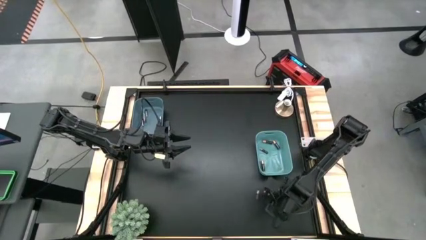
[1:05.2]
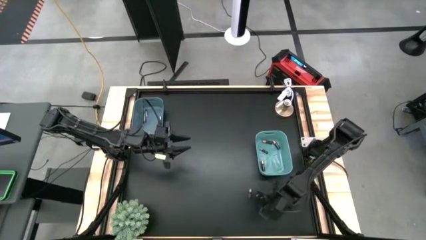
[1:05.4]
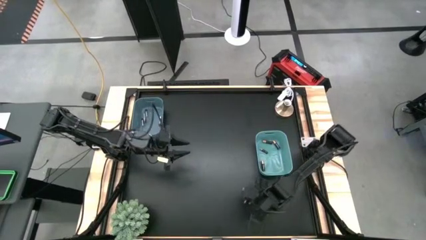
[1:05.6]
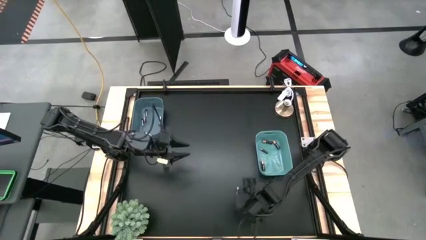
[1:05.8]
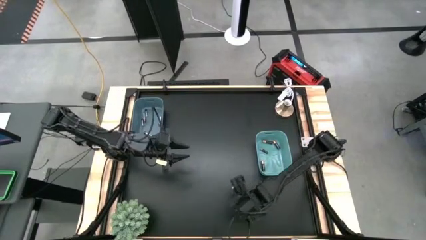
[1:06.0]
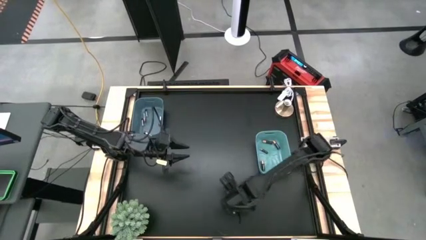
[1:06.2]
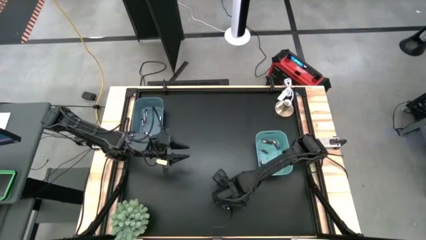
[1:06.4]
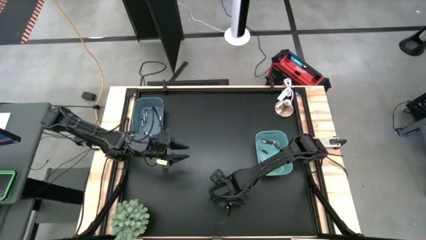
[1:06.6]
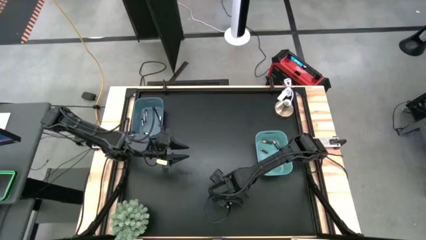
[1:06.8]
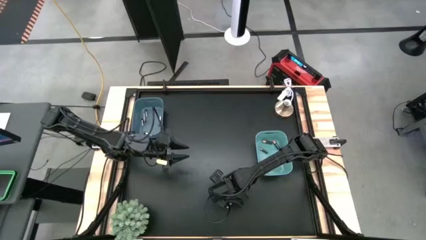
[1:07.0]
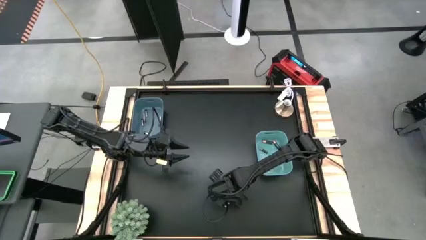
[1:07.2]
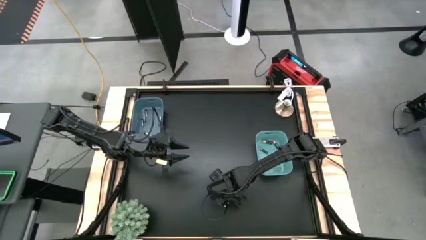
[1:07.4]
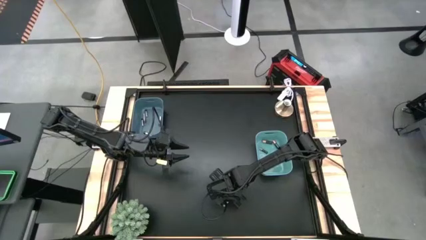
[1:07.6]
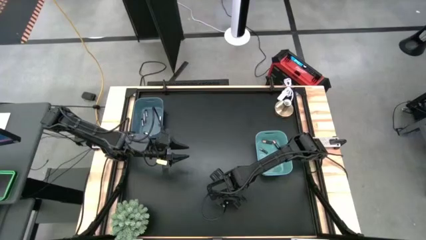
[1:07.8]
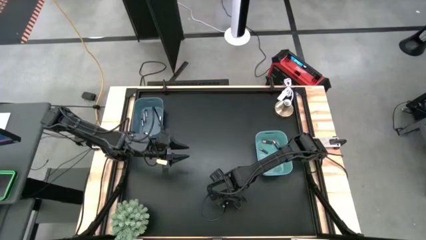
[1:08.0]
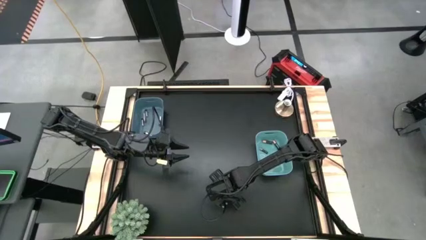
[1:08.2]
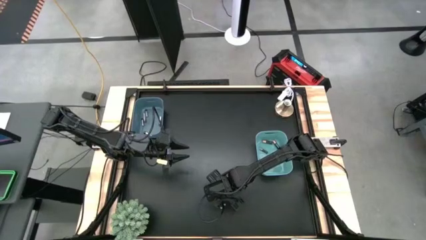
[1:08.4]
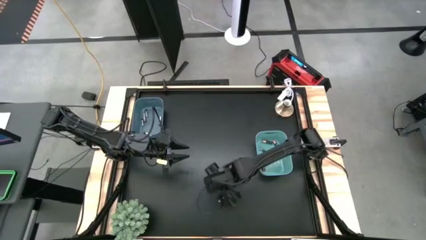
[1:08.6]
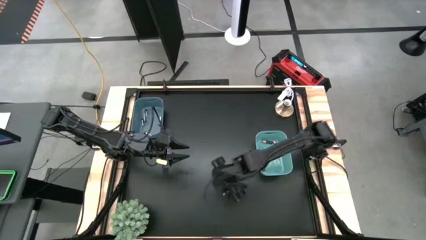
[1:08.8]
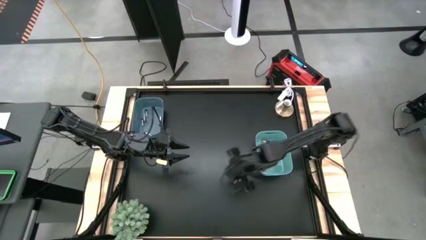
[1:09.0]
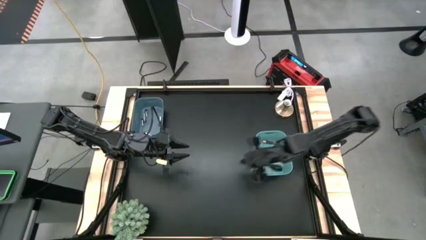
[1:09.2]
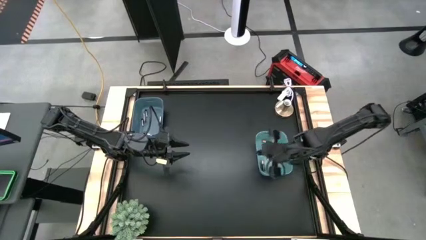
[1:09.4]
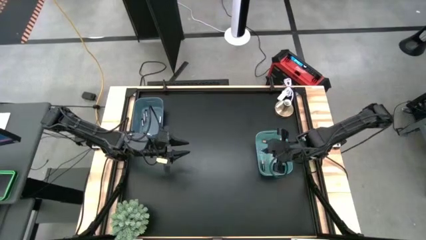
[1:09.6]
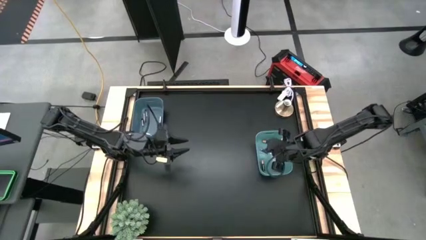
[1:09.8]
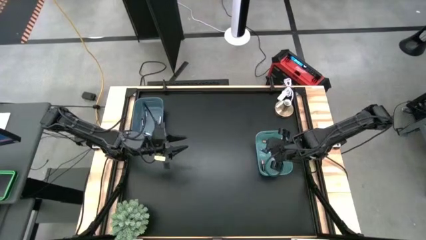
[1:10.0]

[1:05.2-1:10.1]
Task: Sort batteries
Put the brown battery into the green bin

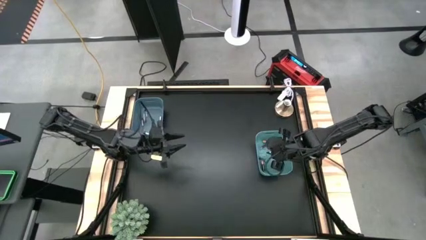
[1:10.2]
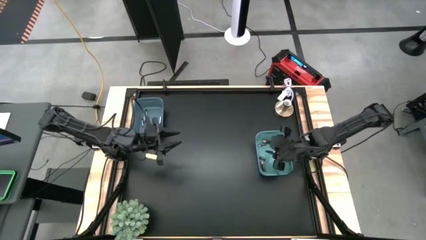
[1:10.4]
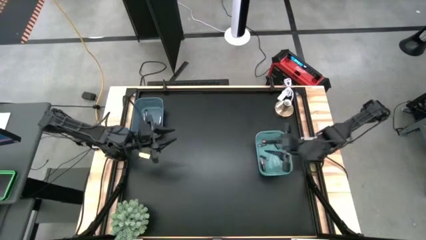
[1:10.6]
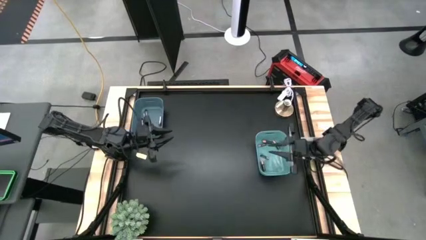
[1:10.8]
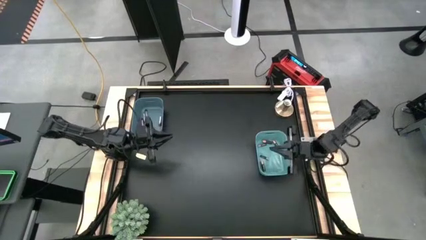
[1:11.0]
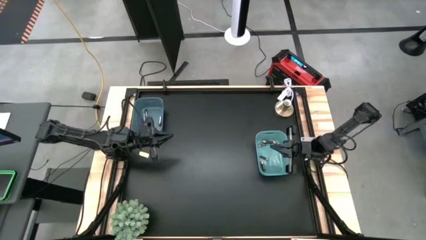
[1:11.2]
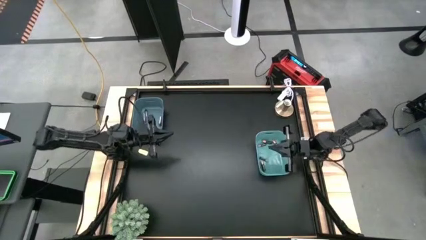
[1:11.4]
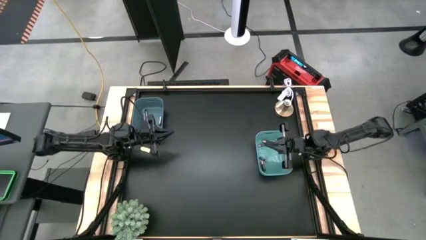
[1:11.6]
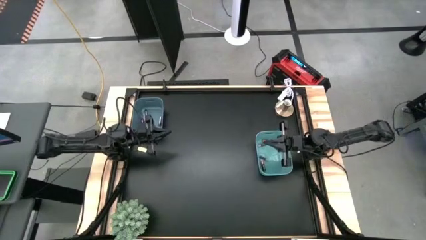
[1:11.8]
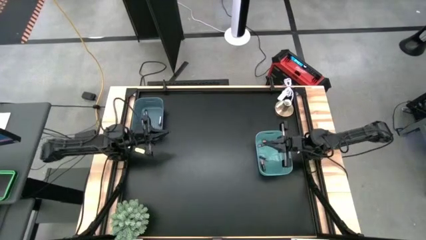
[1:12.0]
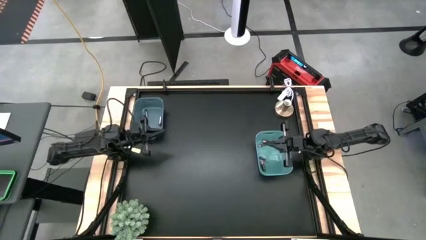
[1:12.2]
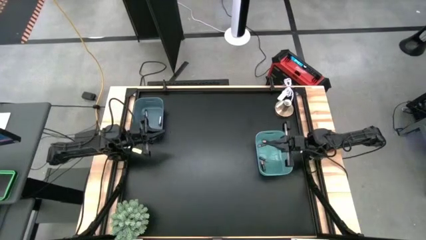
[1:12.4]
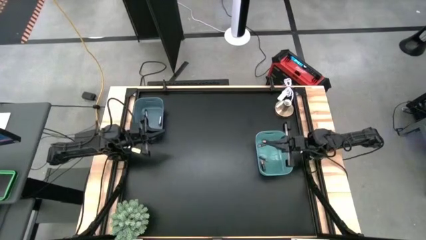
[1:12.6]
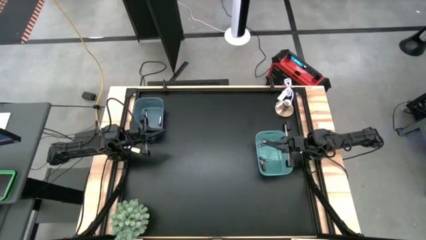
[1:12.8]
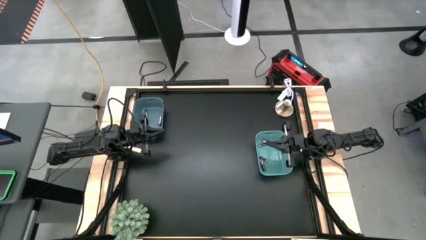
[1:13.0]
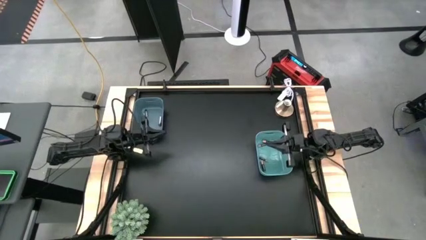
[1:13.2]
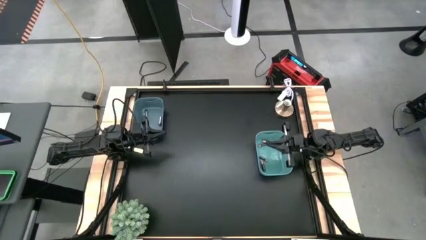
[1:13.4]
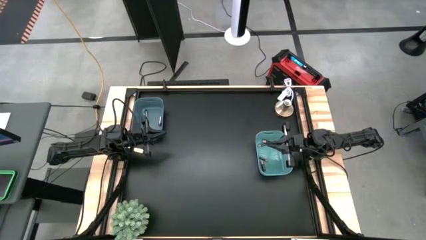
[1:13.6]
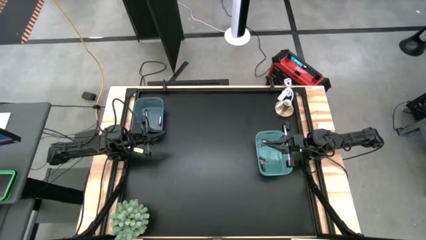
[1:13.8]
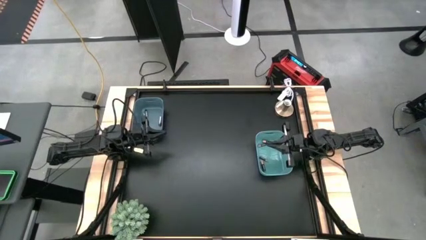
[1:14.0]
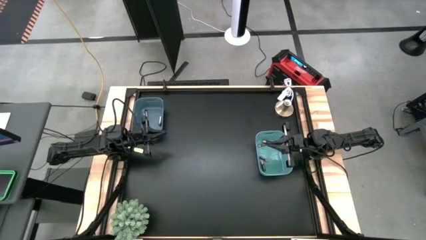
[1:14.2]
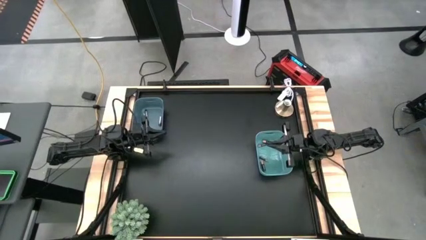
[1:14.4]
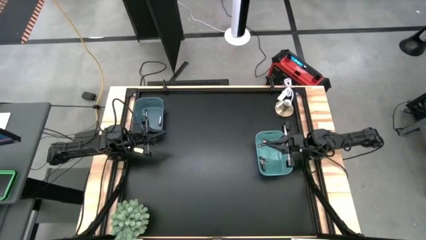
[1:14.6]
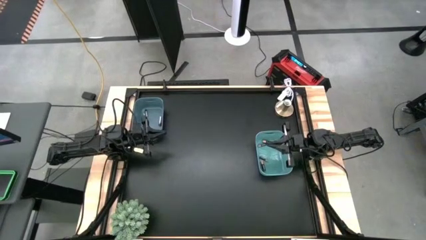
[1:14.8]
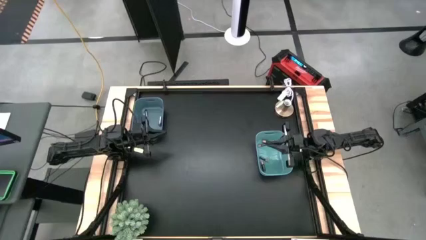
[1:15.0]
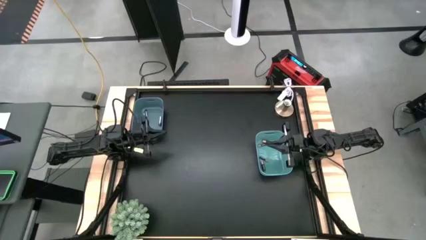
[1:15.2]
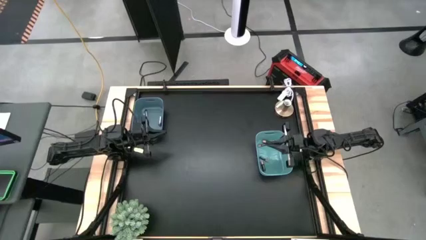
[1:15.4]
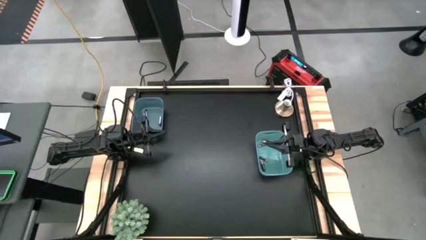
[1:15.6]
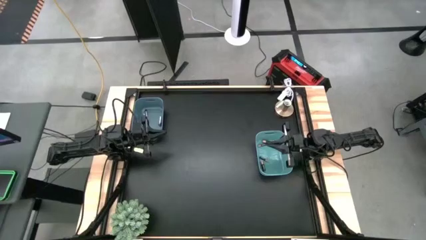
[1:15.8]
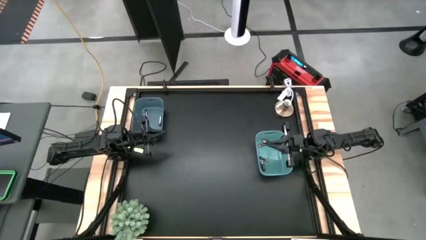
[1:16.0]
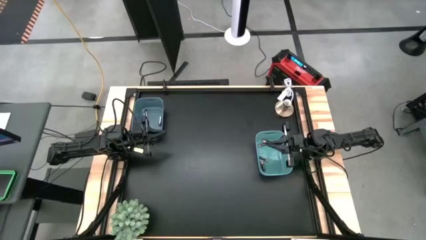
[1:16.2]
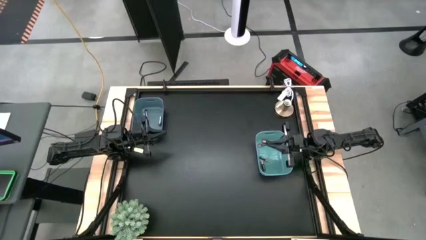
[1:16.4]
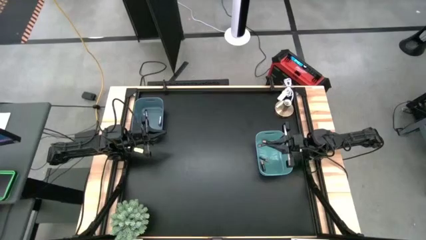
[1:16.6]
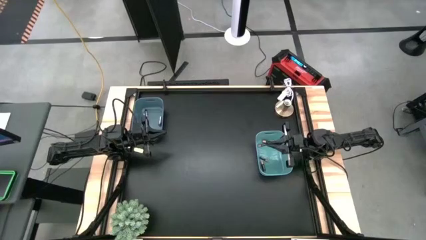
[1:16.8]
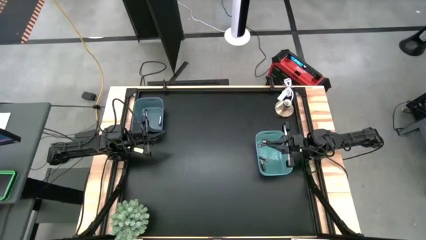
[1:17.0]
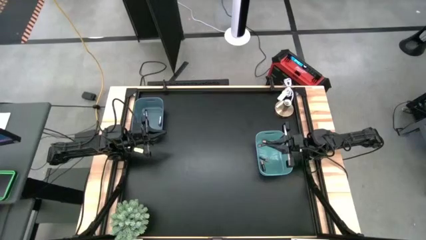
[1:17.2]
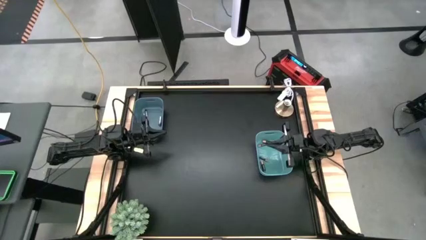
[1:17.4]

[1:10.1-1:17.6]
Return to Home Position

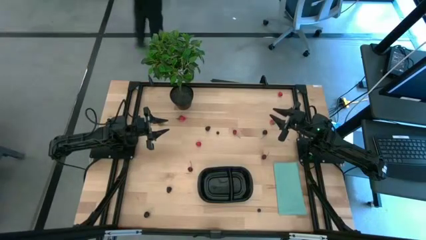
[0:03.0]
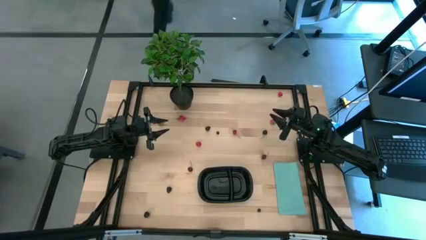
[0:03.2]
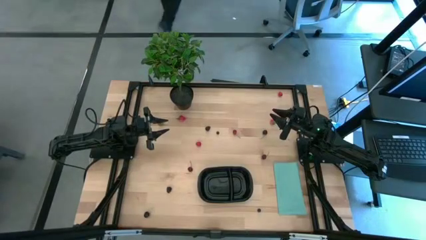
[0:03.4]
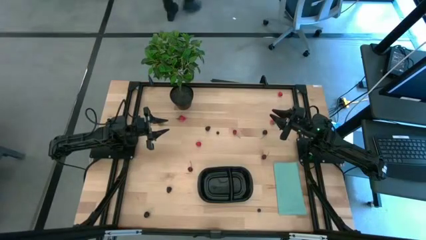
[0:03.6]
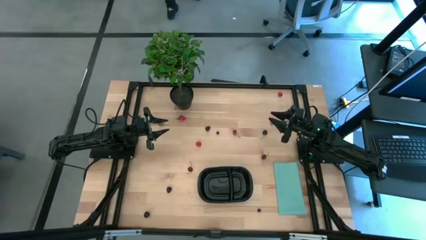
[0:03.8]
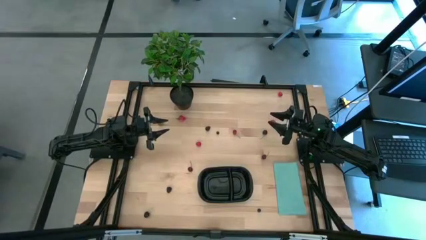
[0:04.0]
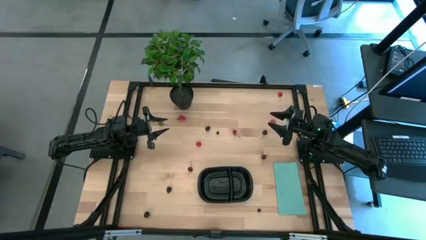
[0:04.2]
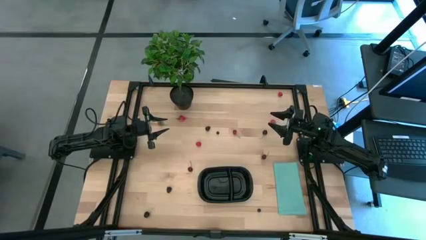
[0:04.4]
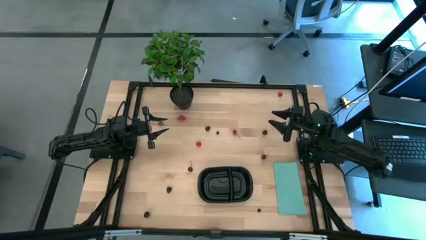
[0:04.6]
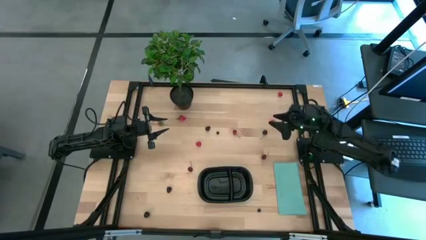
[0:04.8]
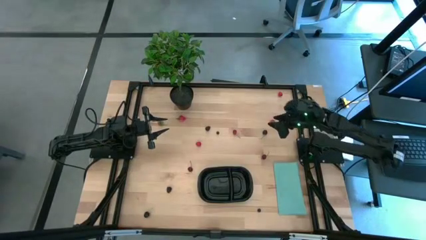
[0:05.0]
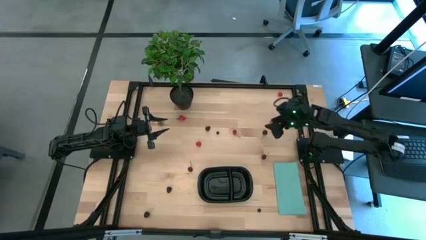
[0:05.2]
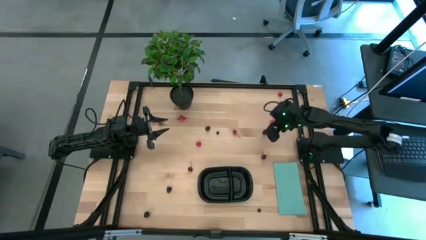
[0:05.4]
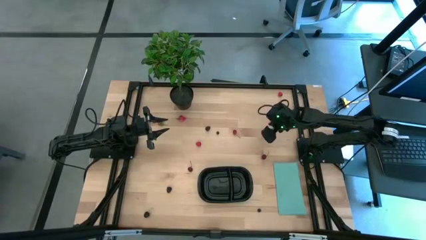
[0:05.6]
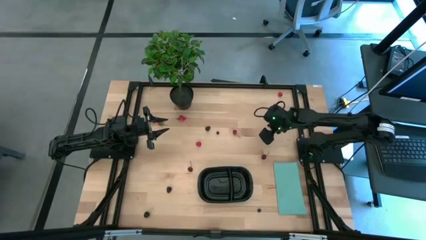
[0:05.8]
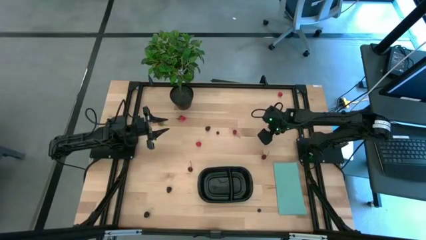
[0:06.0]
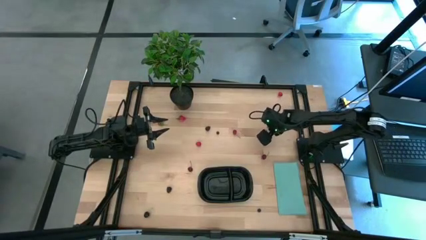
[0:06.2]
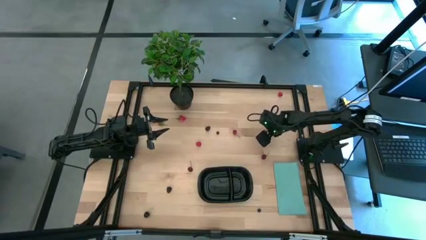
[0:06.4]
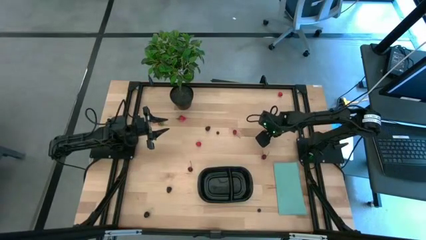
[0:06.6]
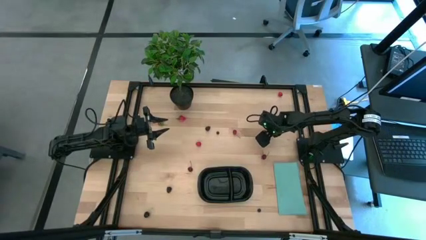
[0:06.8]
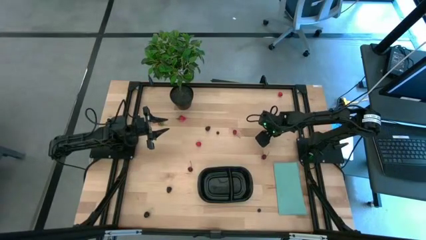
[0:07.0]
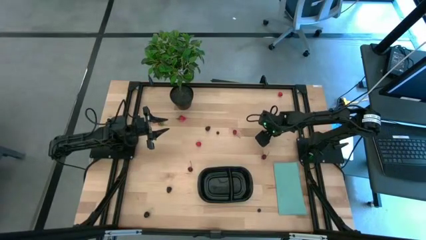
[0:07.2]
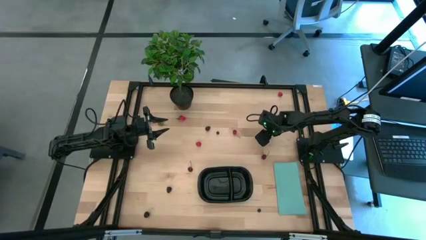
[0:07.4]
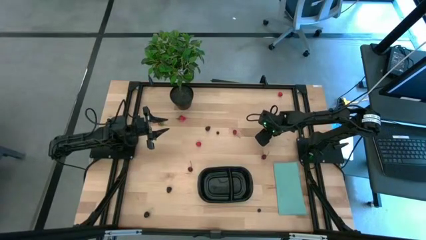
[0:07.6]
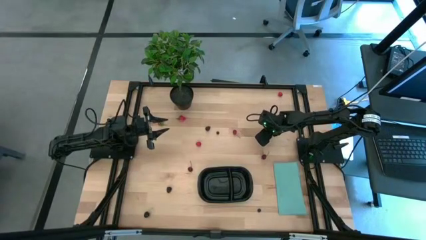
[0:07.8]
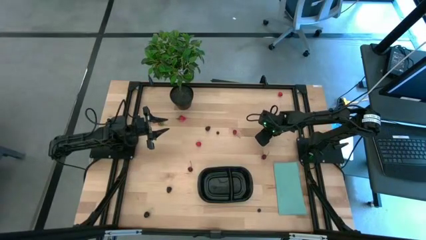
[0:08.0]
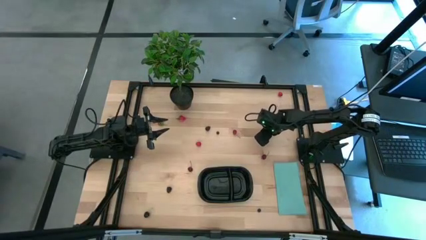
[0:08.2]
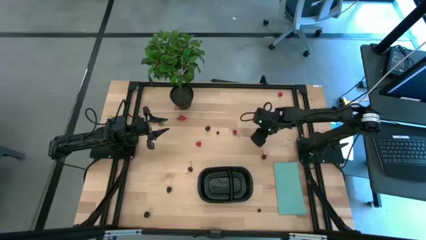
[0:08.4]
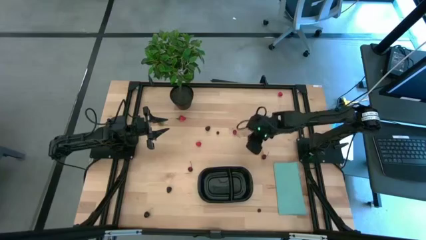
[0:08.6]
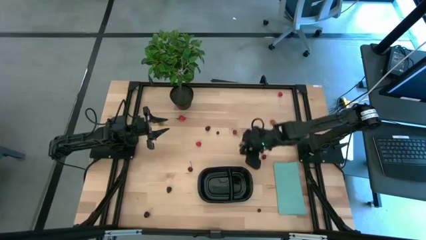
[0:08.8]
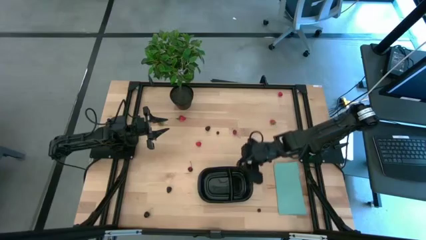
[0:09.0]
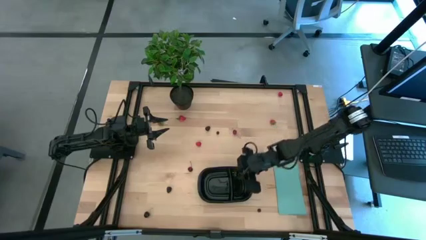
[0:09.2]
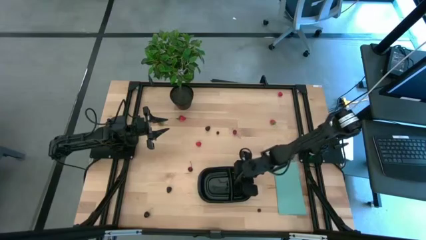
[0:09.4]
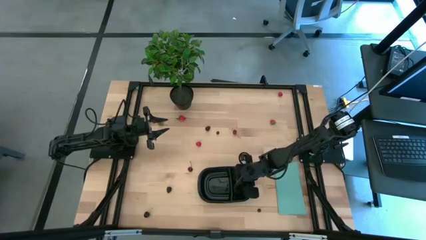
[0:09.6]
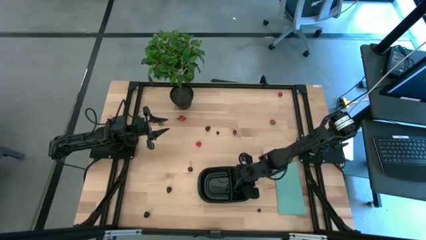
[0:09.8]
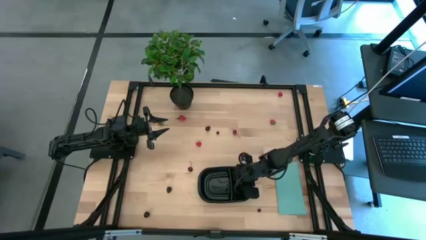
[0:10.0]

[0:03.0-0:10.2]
Task: Pick and placing Produce into tupperware
Put the top right black cherry into the right side of the black container
